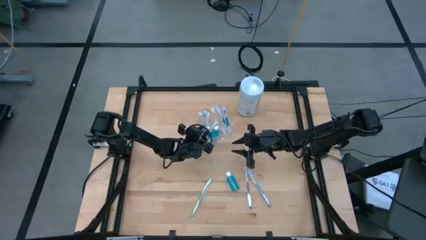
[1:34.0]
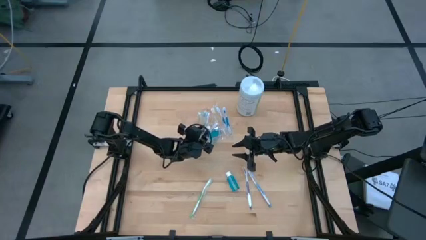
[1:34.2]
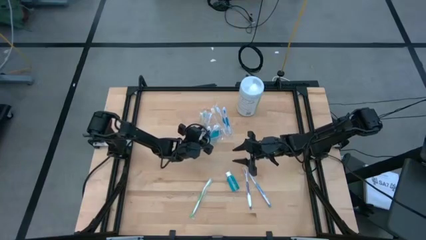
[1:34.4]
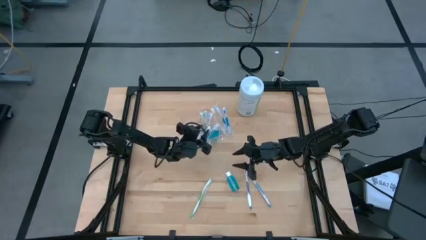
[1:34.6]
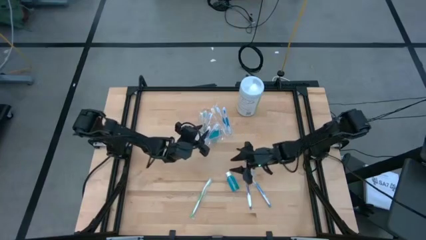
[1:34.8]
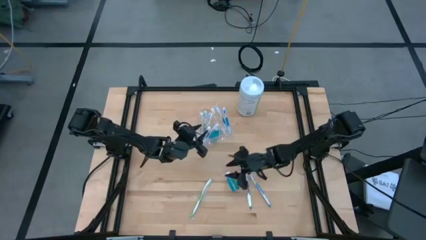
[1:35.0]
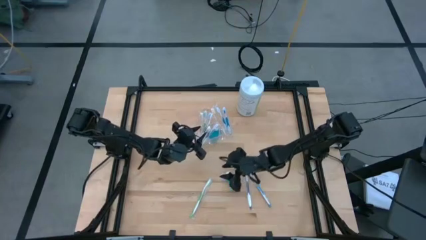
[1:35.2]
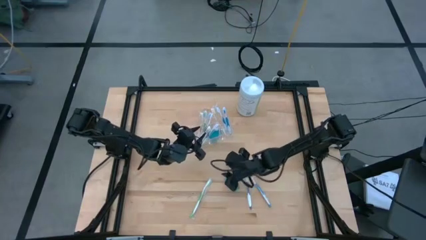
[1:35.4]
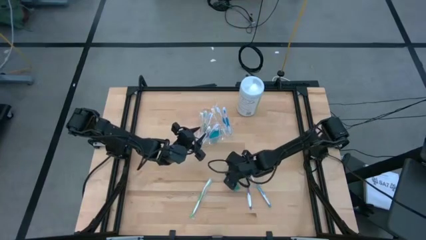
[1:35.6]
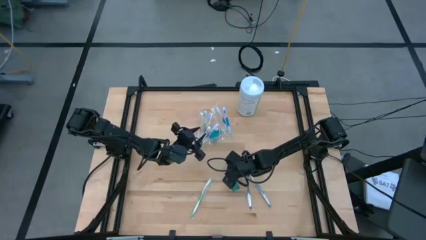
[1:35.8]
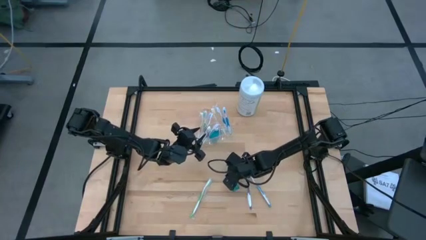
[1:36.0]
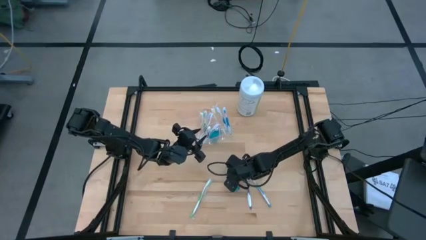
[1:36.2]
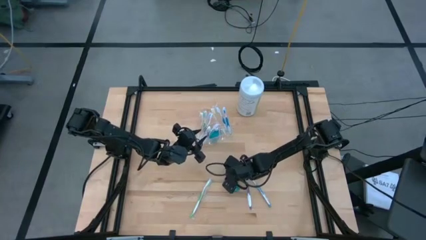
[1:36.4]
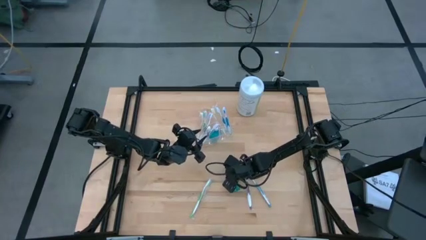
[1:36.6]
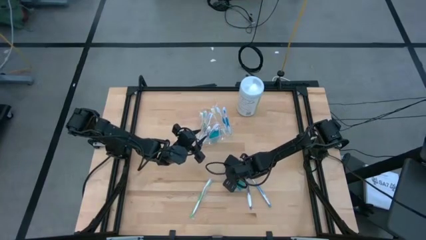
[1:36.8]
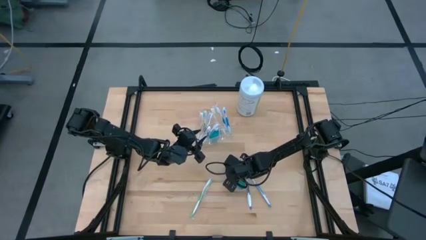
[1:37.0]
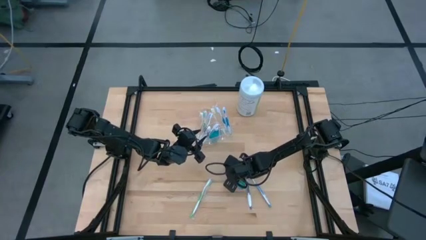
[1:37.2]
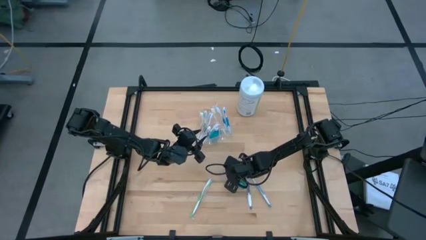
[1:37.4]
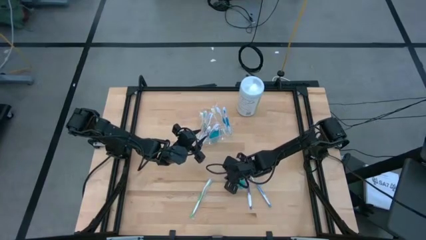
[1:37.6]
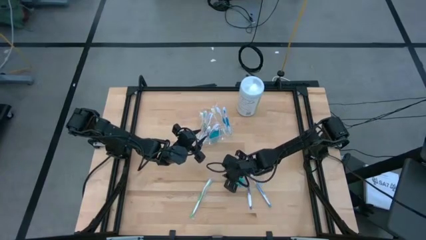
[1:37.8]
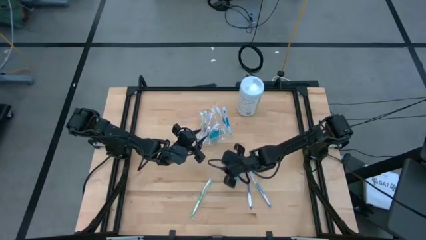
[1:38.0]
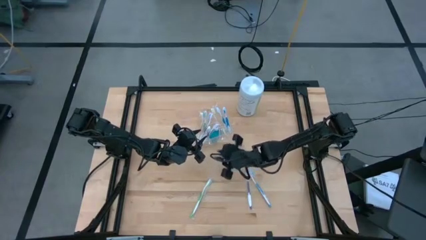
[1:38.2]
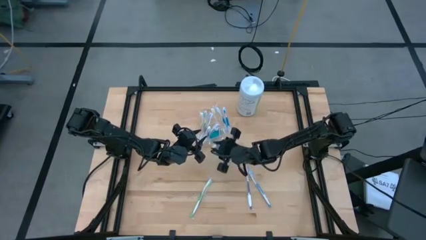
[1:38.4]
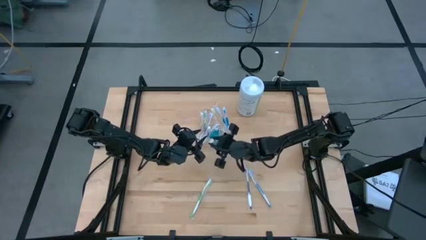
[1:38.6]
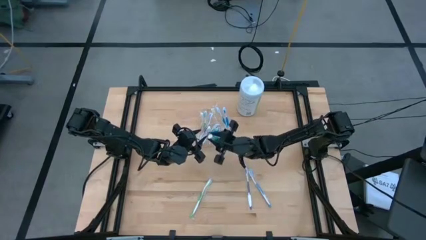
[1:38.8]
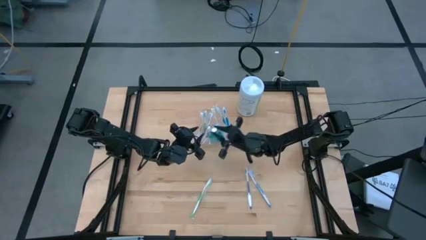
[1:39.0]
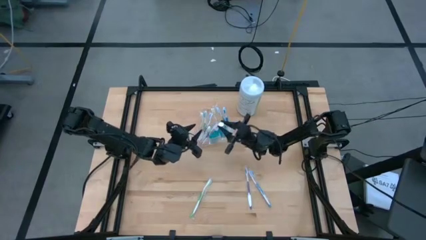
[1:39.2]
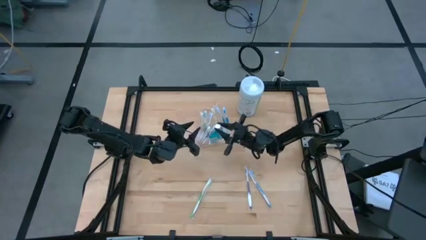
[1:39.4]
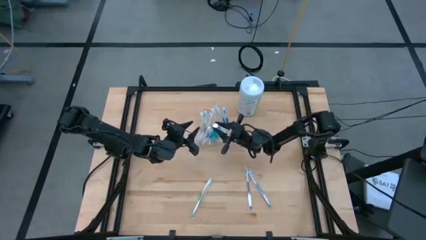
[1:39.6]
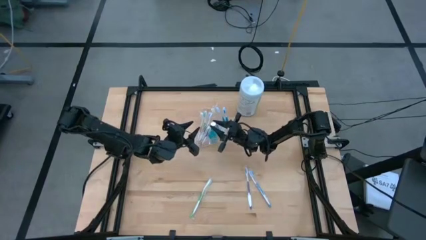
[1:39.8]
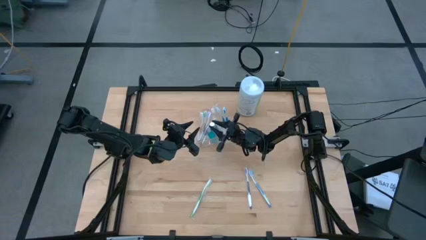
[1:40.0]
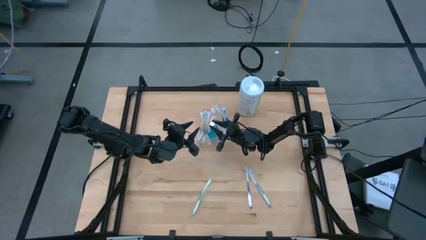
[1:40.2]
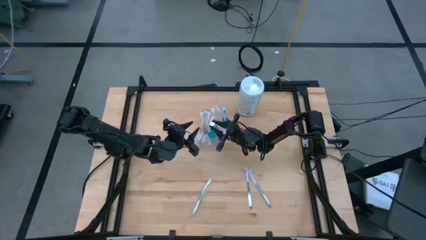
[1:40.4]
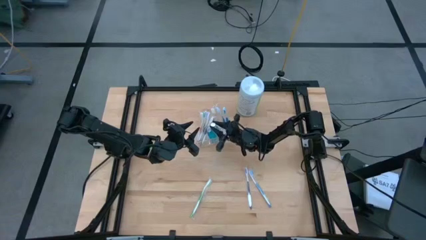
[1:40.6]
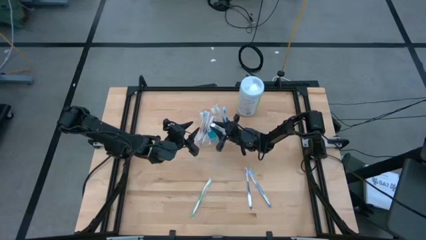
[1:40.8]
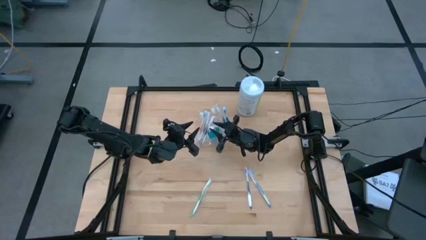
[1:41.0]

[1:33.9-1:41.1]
Task: Pick & Place toothbrushing station
Put the blue mouthwash into the transparent organizer

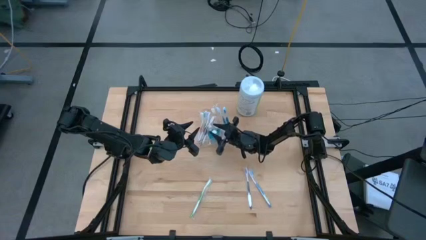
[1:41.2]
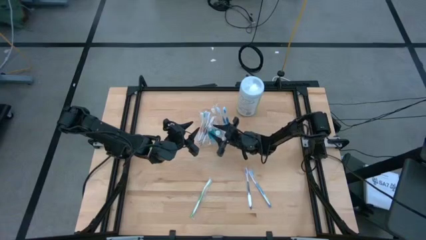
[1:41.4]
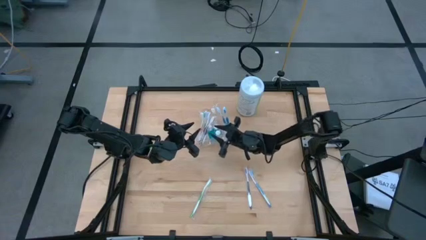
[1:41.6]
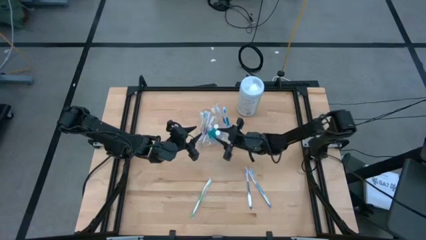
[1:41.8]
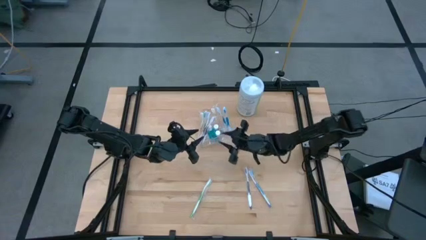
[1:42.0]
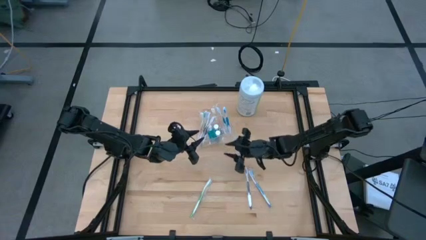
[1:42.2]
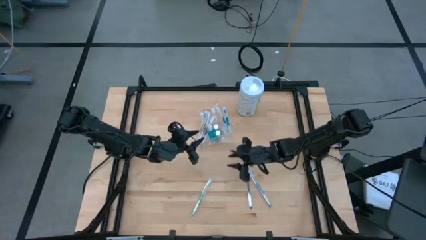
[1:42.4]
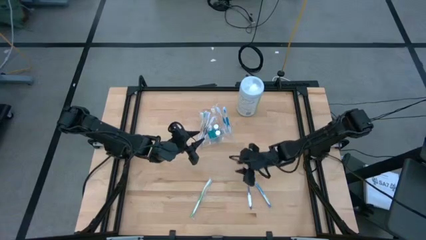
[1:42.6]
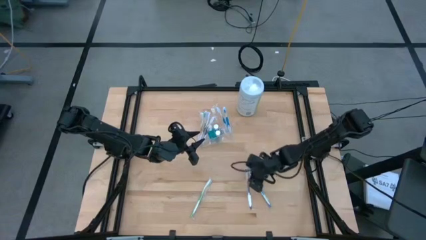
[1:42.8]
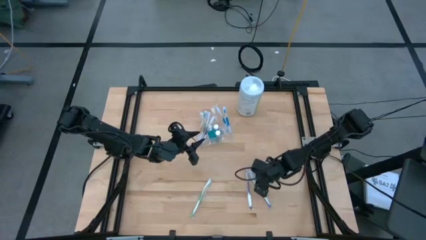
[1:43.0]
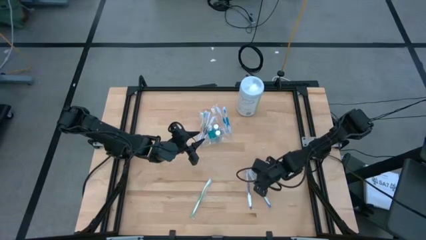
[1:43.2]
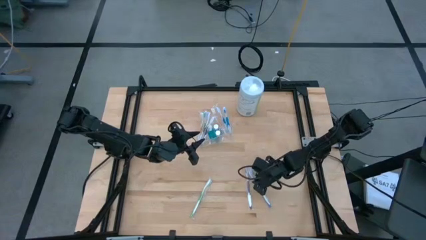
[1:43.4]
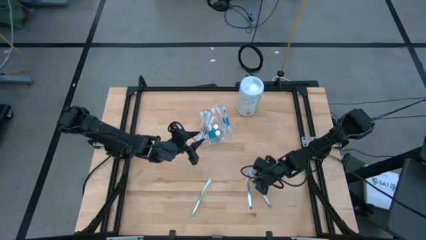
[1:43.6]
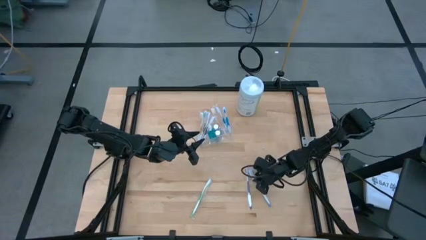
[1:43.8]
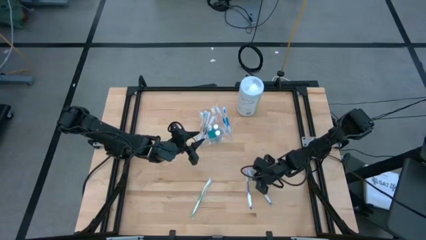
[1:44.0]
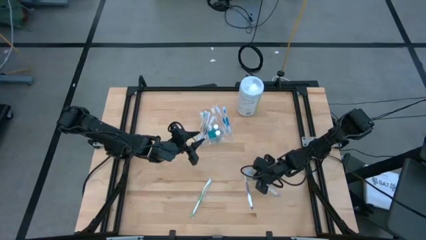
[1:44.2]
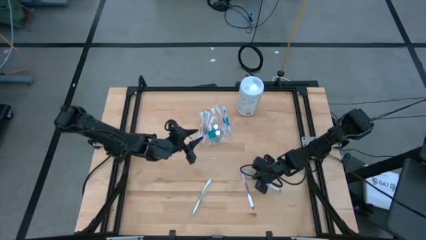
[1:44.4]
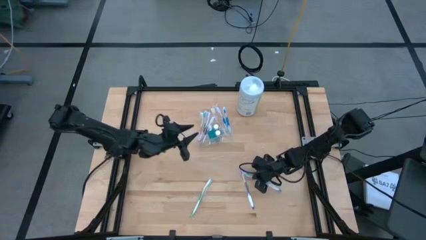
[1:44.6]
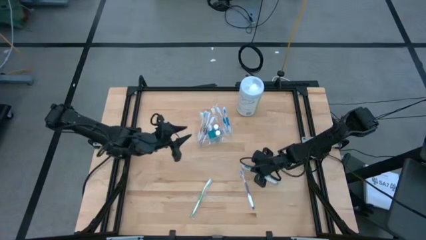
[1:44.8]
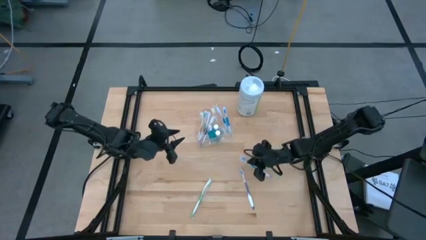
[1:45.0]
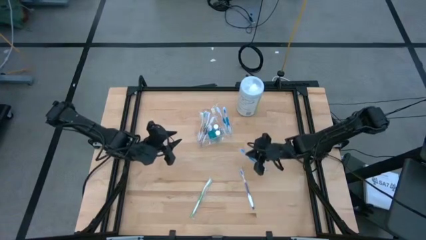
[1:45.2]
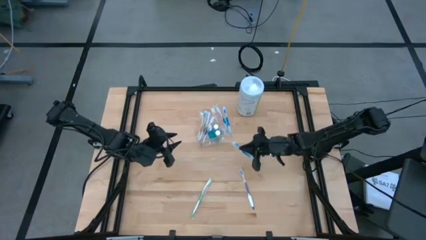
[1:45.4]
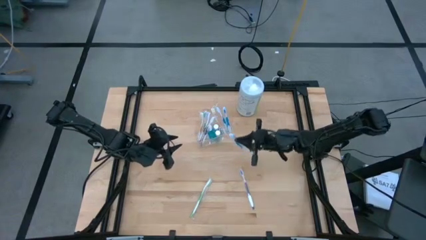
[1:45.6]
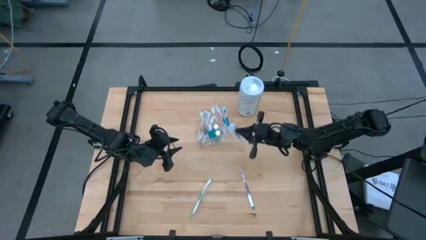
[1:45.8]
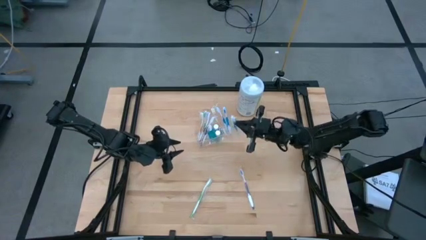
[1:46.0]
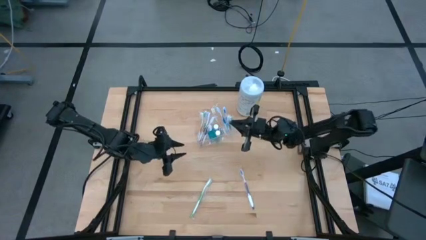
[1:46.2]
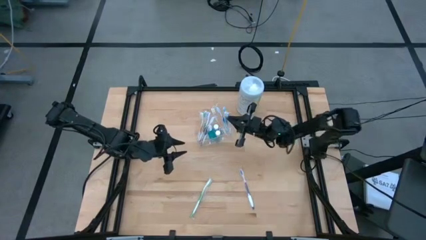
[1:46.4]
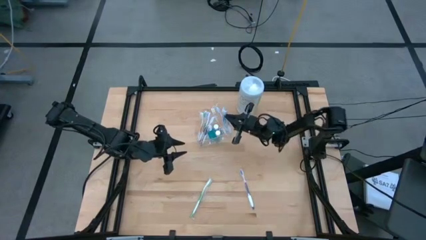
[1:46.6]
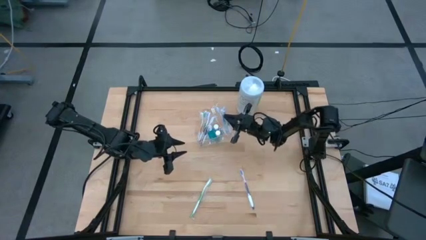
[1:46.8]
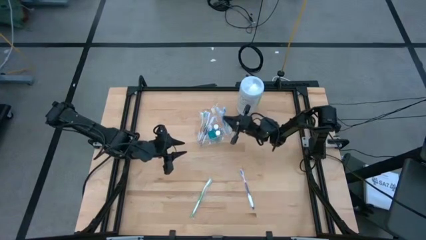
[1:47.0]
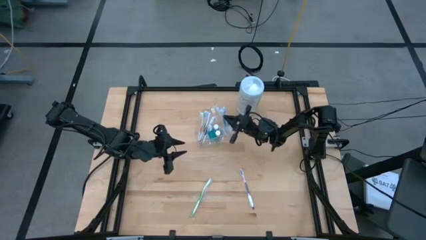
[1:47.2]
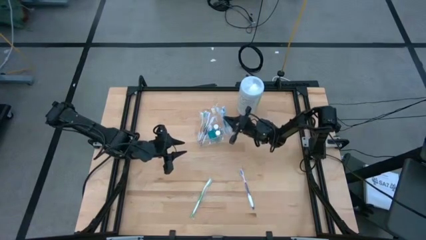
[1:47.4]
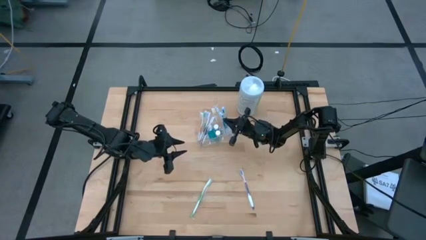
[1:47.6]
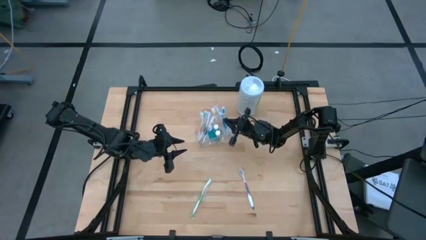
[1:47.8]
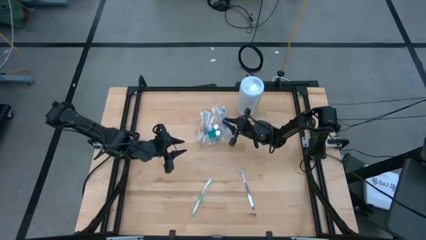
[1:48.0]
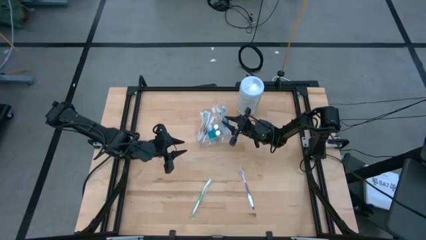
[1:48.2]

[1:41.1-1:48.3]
Put the blue toothbrush into the transparent organizer
